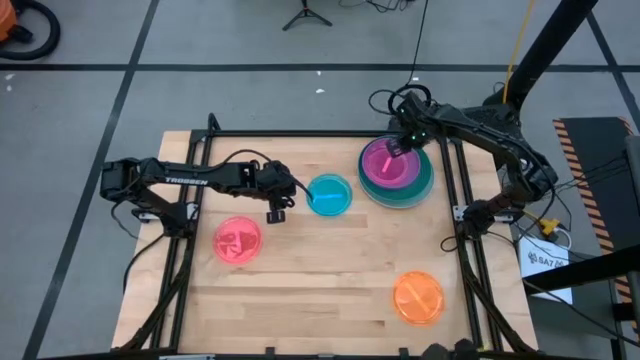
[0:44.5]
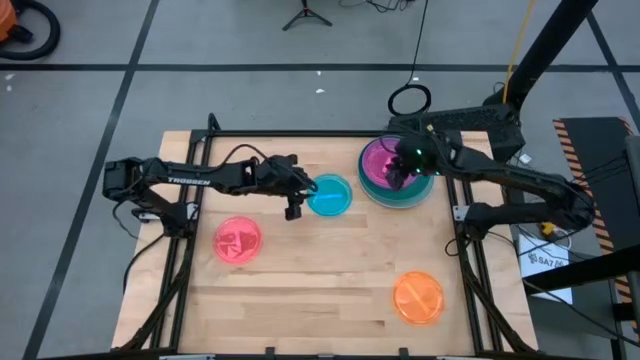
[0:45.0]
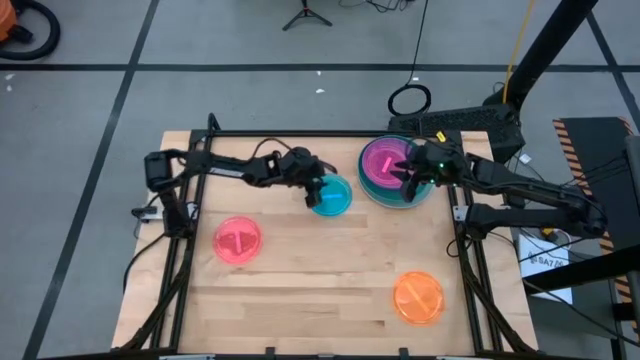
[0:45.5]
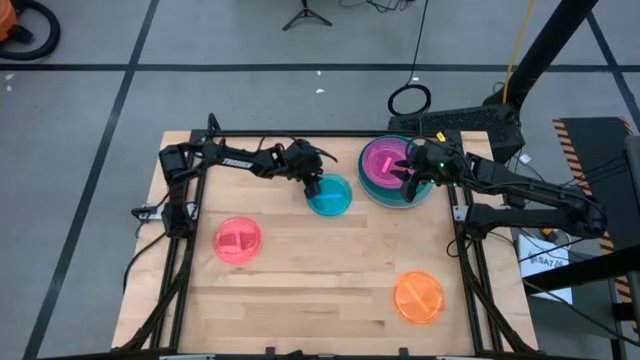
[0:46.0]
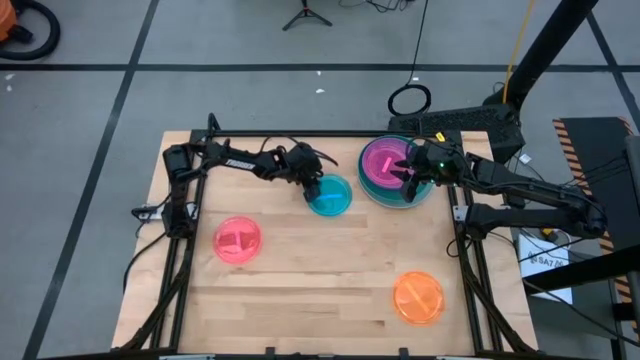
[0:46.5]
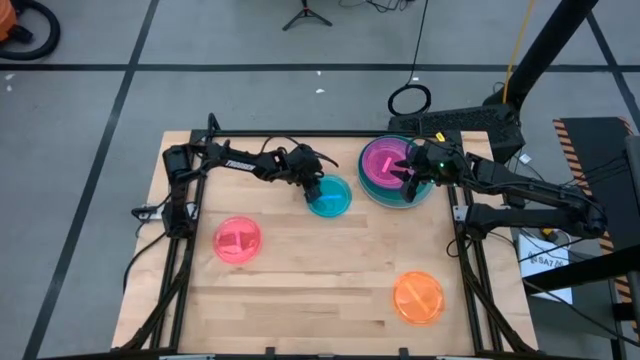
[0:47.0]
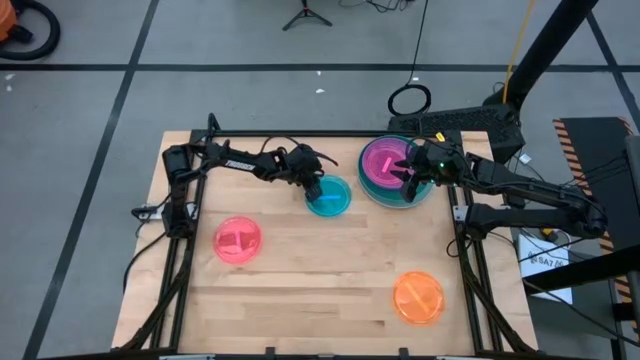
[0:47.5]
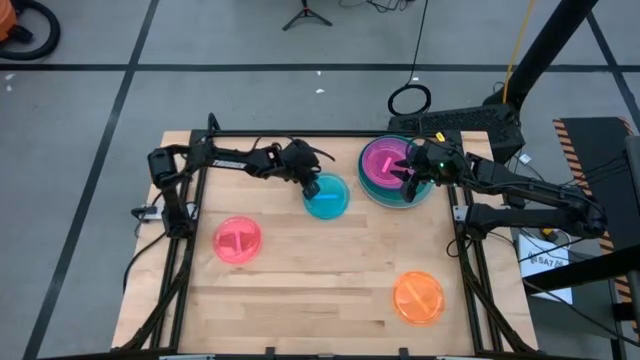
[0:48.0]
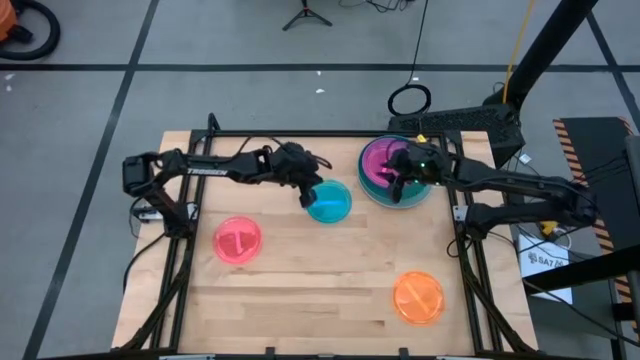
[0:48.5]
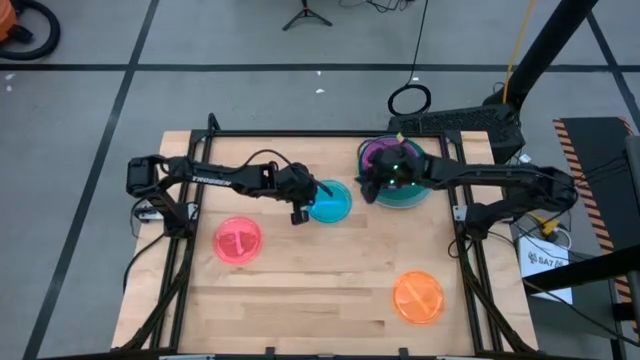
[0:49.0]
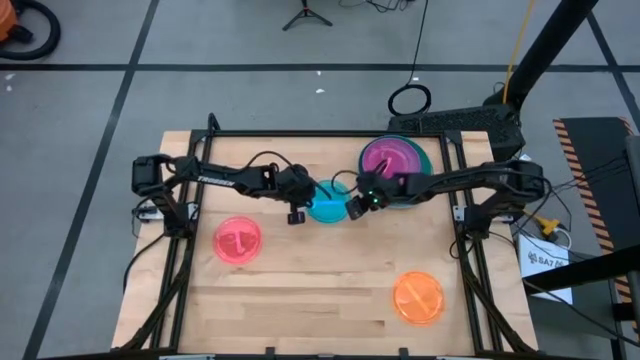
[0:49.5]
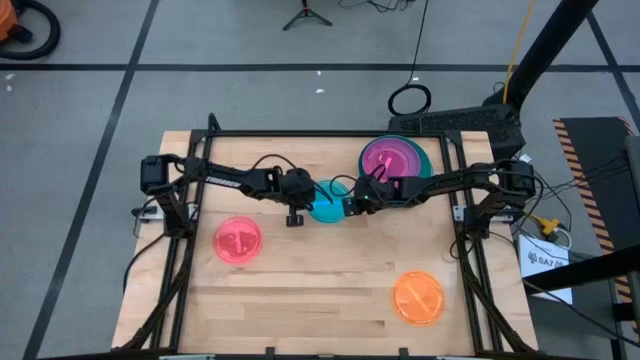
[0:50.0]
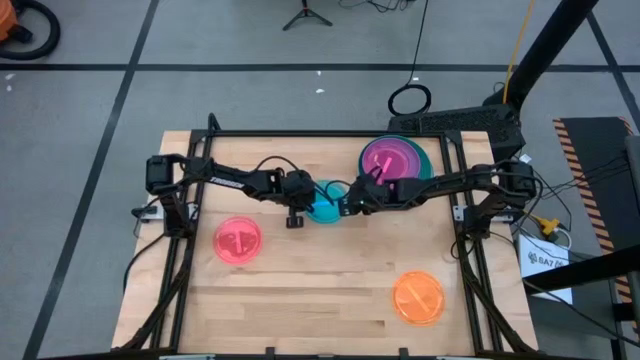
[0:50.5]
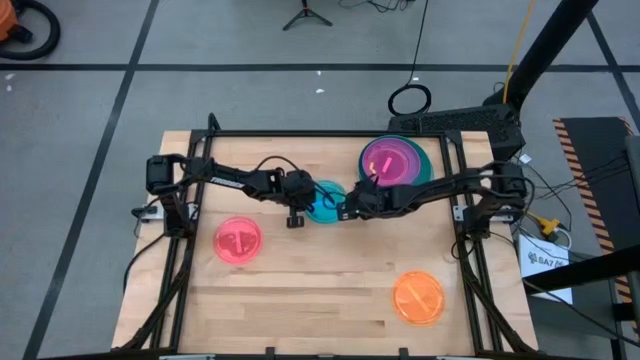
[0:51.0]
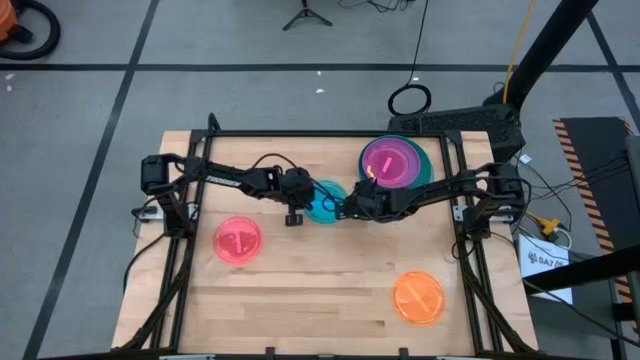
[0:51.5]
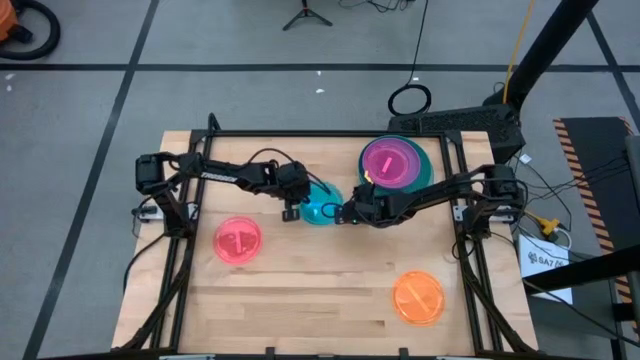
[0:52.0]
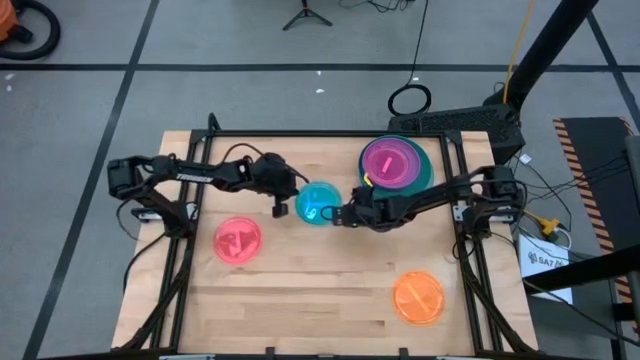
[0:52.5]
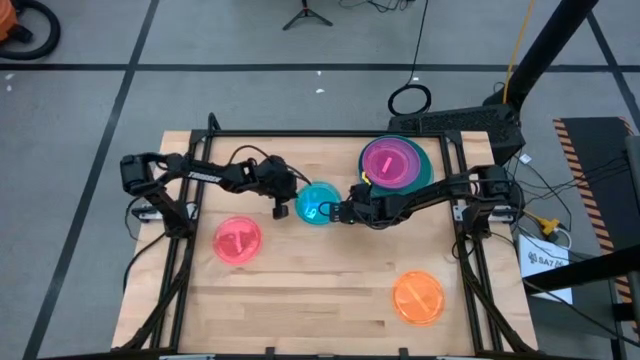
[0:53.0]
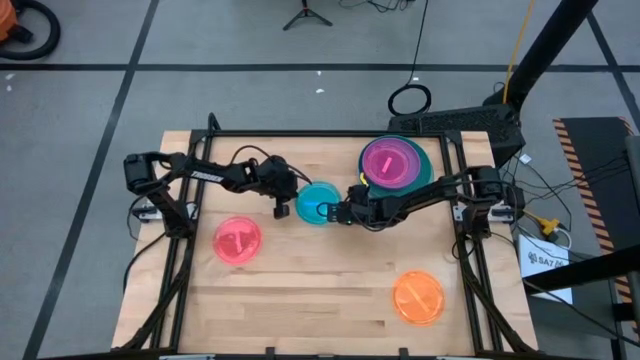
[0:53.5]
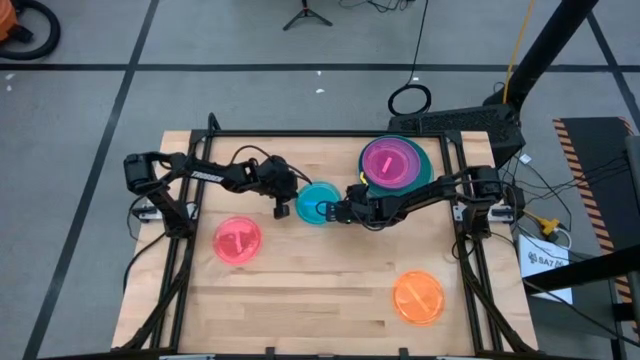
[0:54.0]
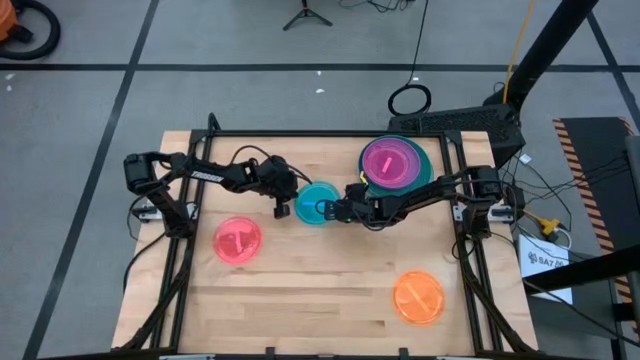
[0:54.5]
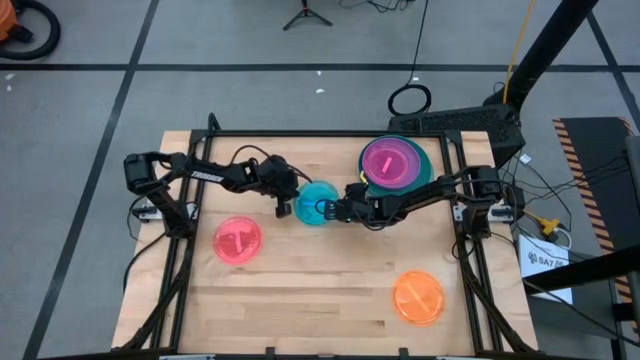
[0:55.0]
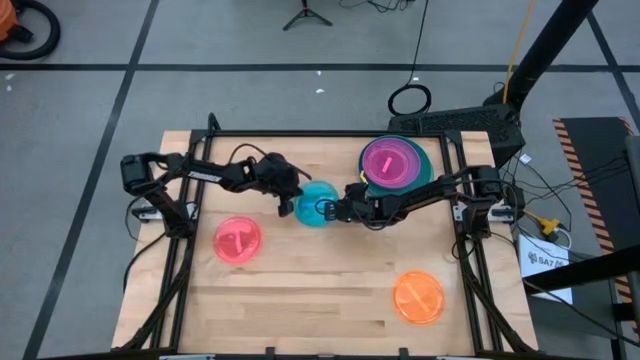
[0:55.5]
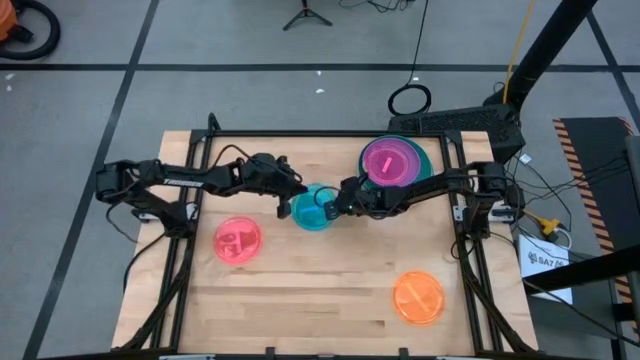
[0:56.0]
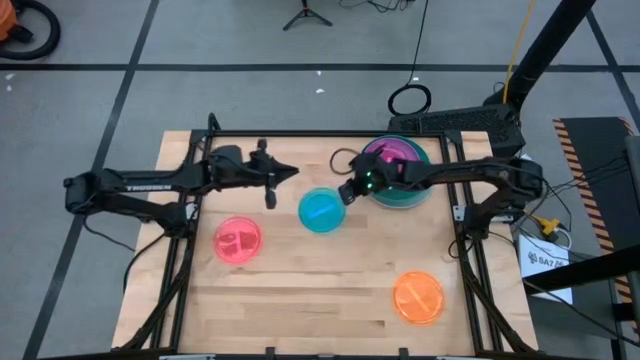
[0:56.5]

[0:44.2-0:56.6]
Task: Stack plastic plates
Stack the blue plate on top of the pink plate

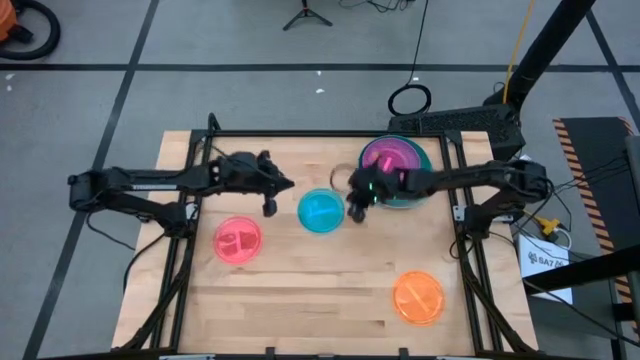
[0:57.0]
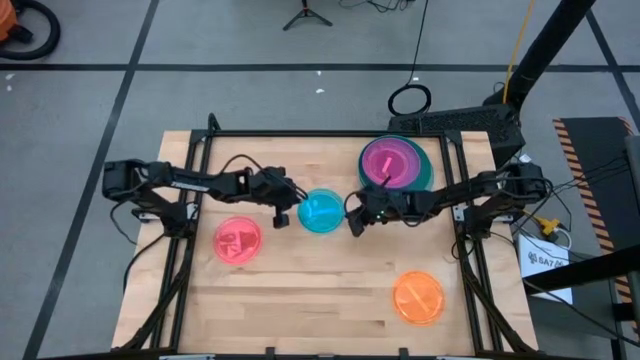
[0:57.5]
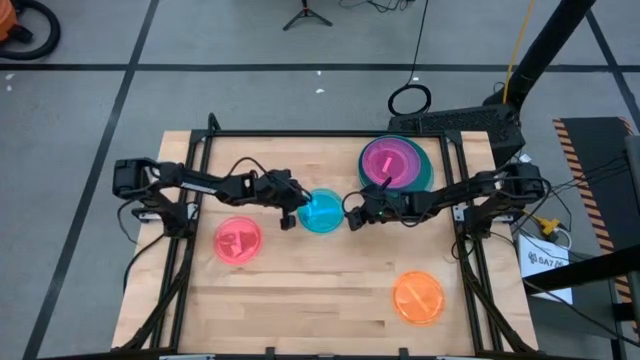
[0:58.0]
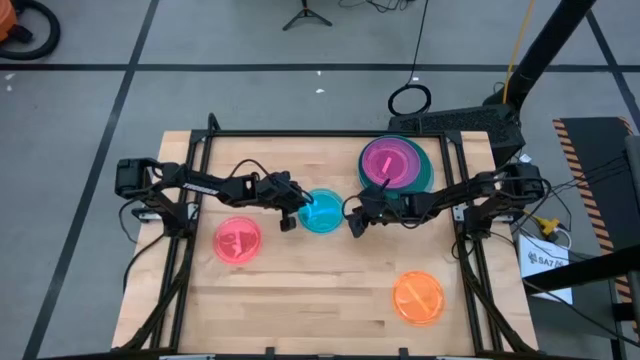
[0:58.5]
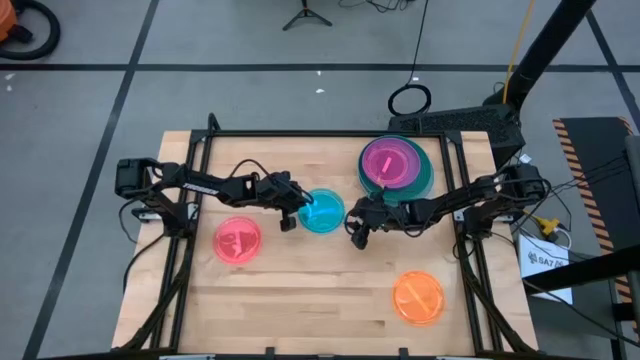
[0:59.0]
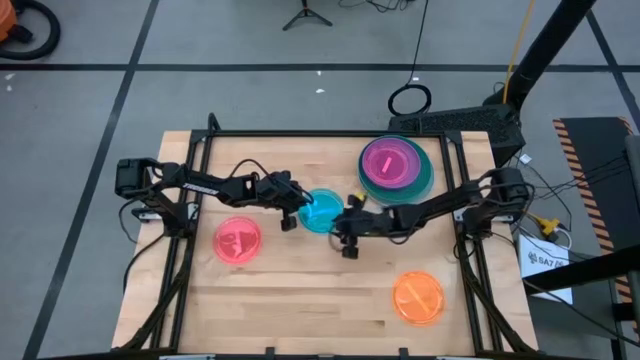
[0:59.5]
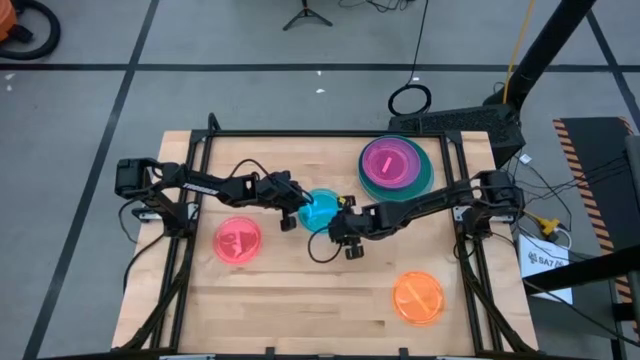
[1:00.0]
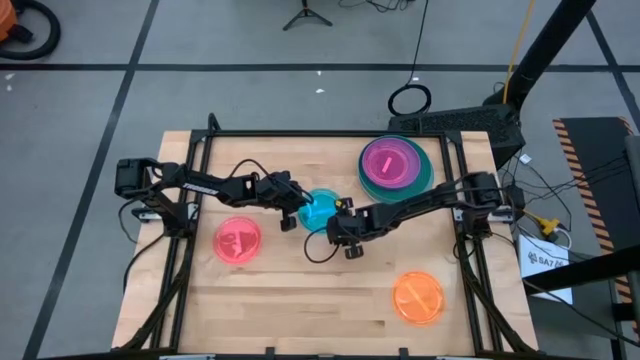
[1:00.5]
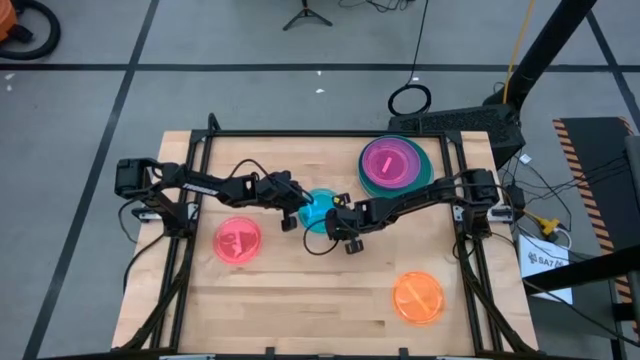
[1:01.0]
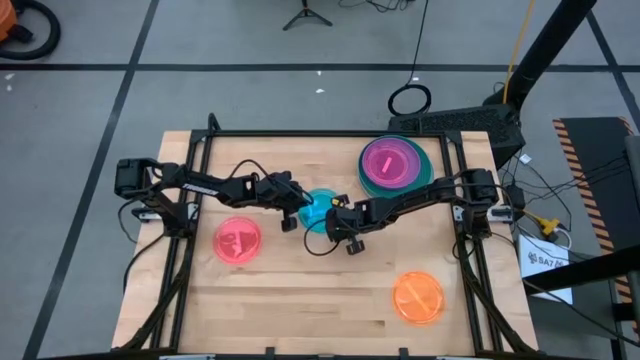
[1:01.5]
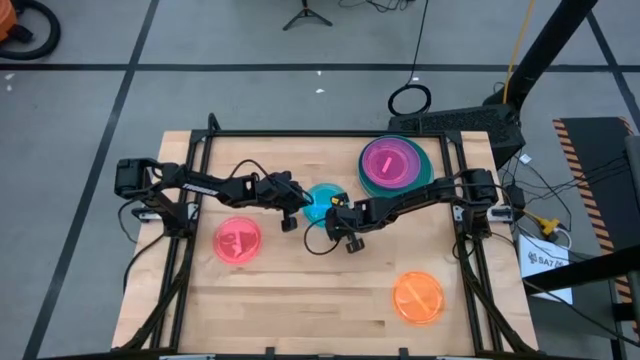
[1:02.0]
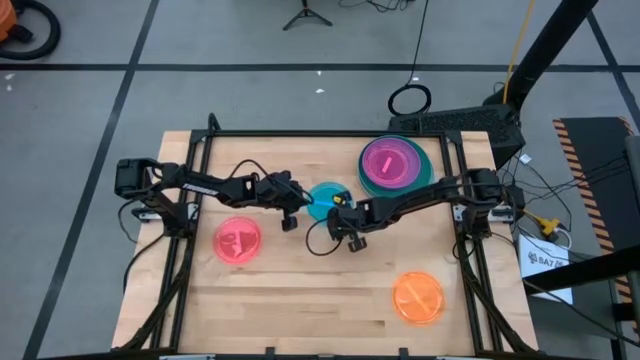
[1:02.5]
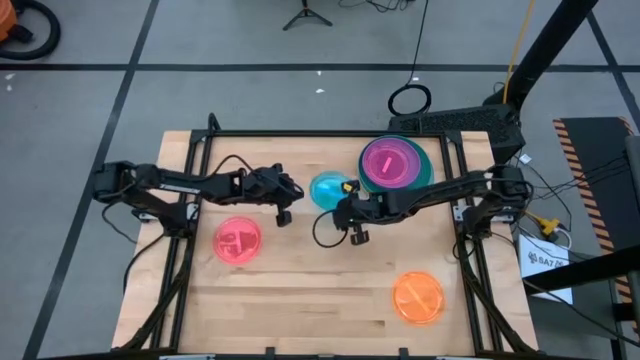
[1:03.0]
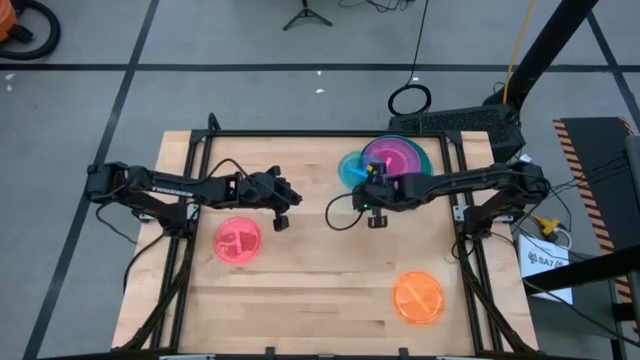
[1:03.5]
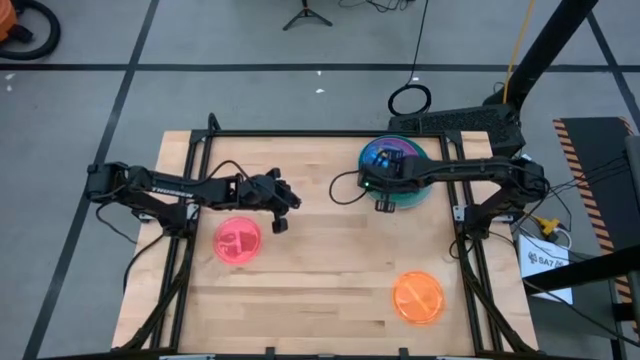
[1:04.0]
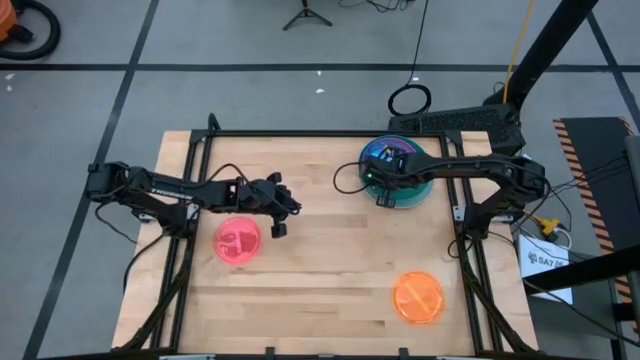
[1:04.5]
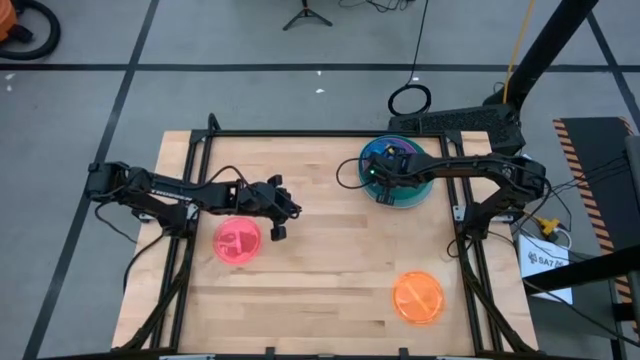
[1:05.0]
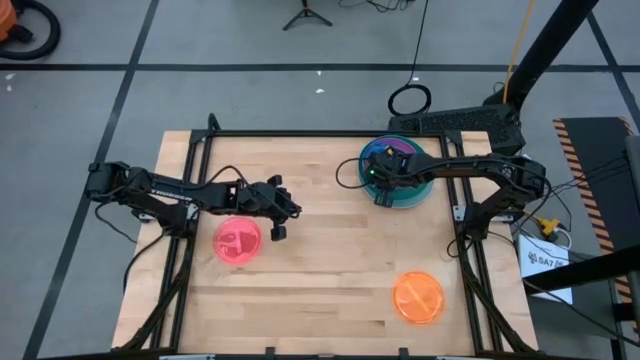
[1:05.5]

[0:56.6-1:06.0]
Stack the blue plate on top of the pink plate
